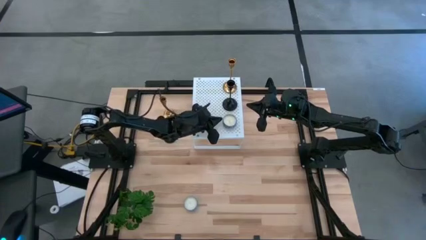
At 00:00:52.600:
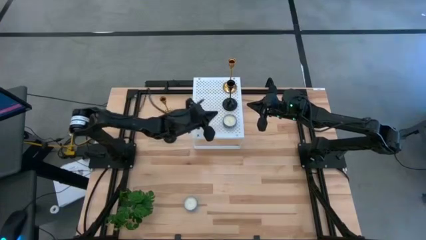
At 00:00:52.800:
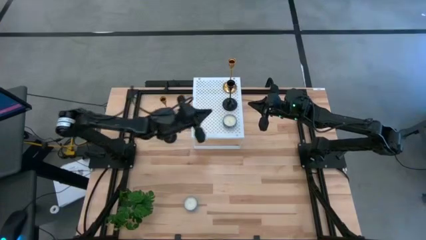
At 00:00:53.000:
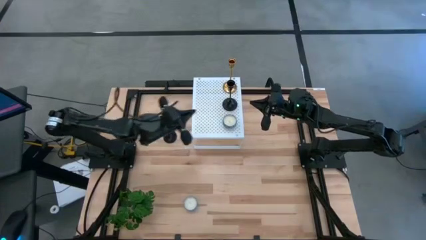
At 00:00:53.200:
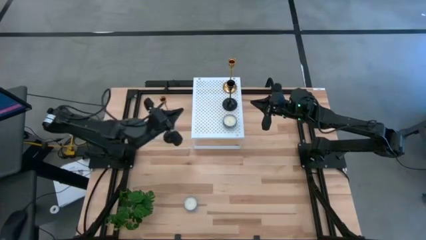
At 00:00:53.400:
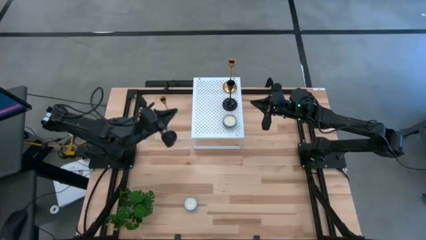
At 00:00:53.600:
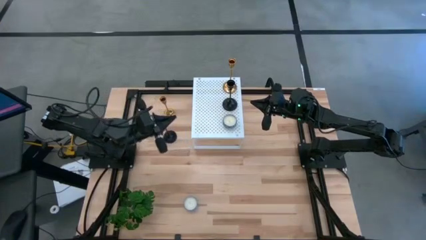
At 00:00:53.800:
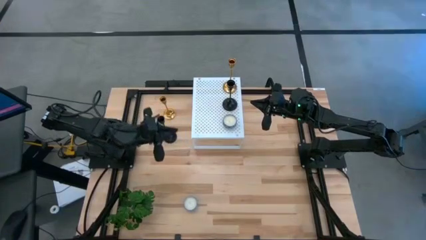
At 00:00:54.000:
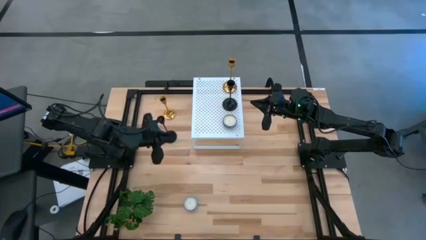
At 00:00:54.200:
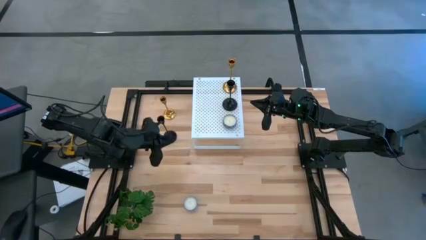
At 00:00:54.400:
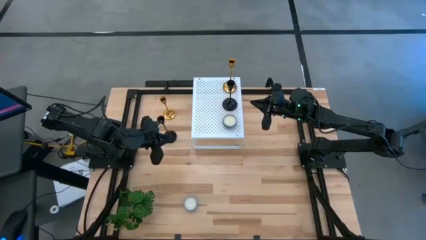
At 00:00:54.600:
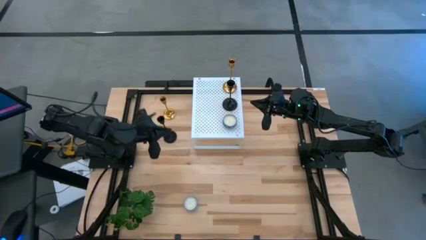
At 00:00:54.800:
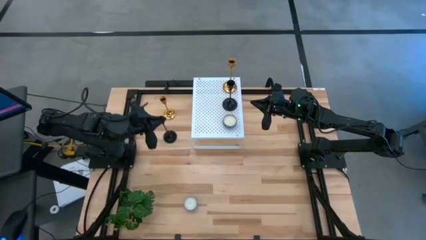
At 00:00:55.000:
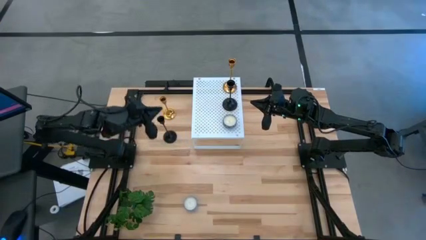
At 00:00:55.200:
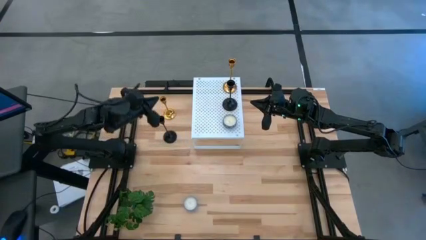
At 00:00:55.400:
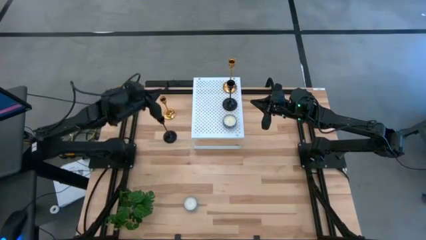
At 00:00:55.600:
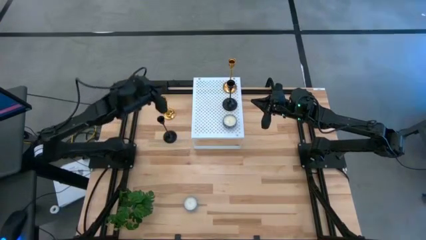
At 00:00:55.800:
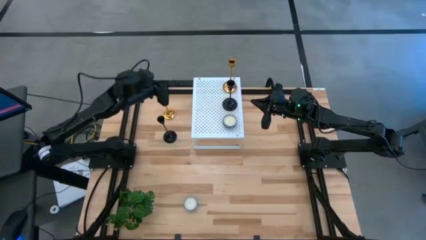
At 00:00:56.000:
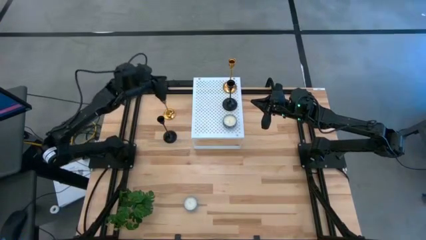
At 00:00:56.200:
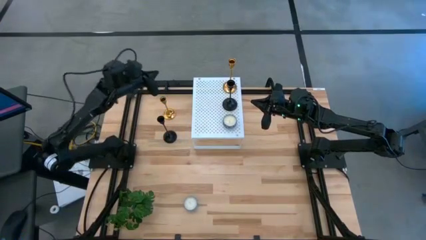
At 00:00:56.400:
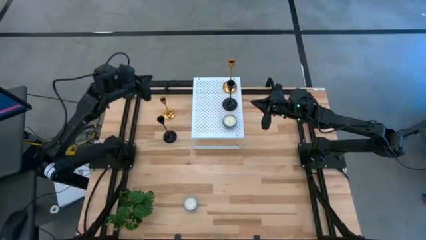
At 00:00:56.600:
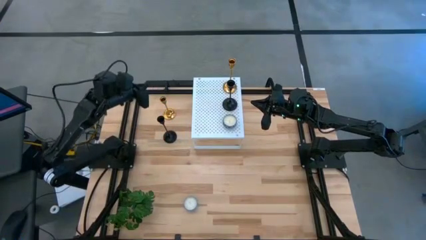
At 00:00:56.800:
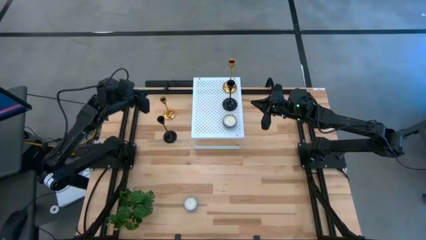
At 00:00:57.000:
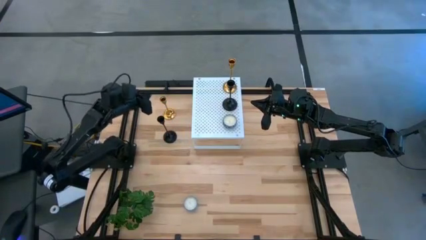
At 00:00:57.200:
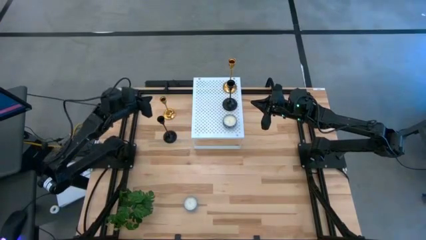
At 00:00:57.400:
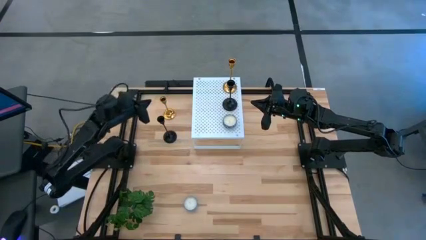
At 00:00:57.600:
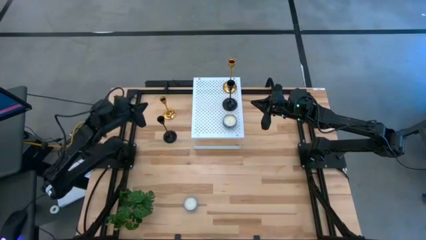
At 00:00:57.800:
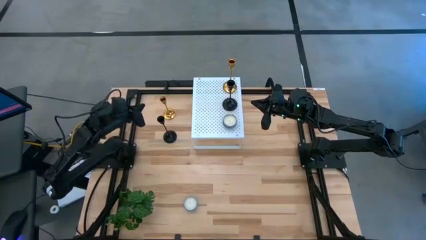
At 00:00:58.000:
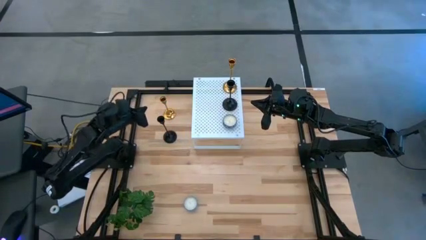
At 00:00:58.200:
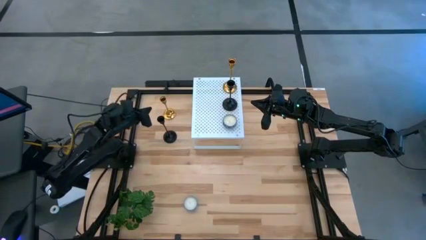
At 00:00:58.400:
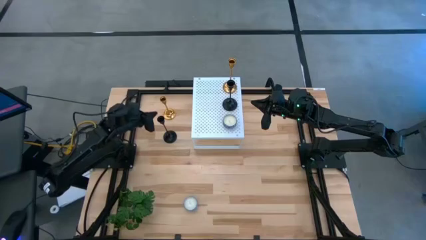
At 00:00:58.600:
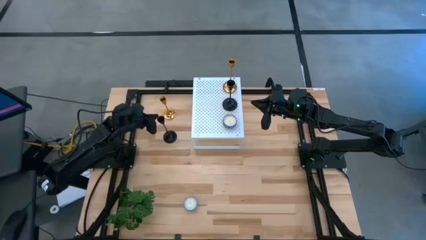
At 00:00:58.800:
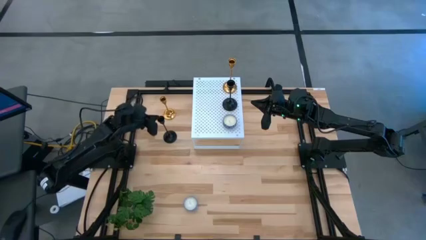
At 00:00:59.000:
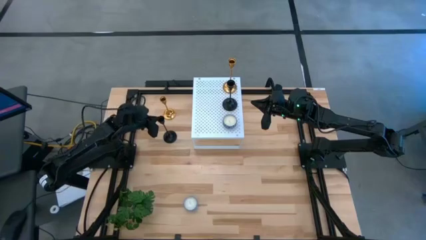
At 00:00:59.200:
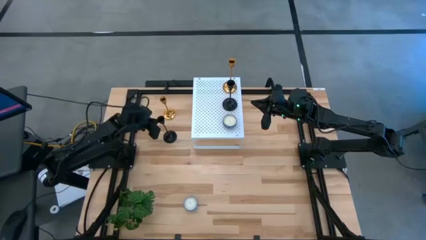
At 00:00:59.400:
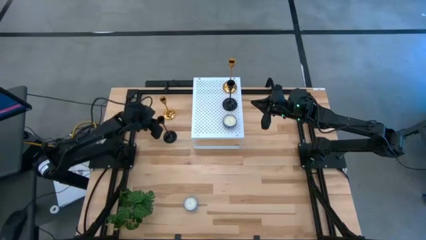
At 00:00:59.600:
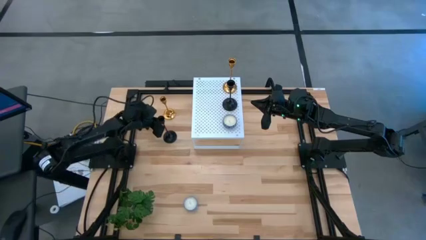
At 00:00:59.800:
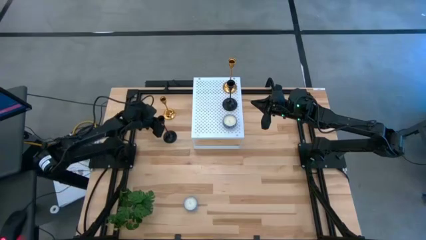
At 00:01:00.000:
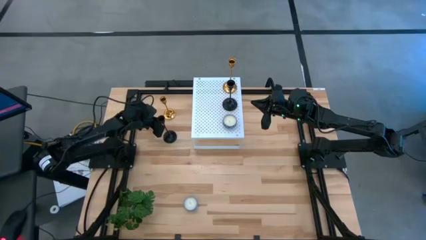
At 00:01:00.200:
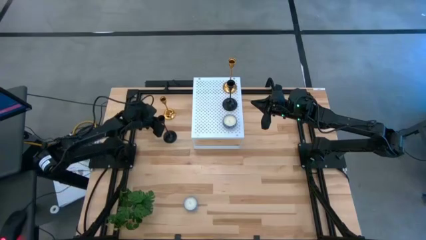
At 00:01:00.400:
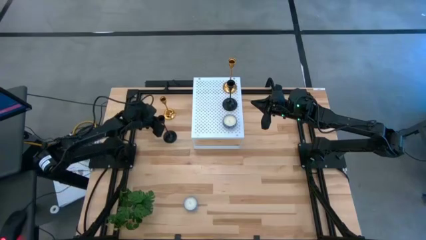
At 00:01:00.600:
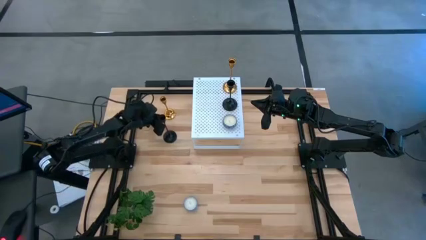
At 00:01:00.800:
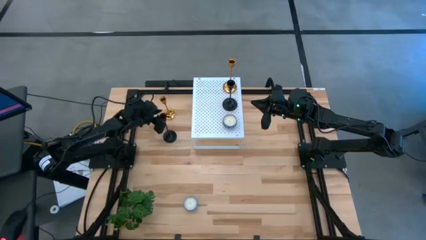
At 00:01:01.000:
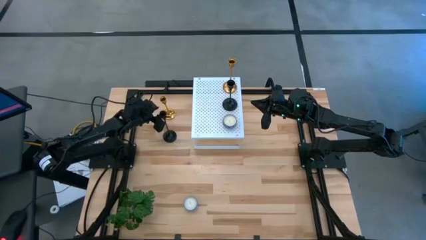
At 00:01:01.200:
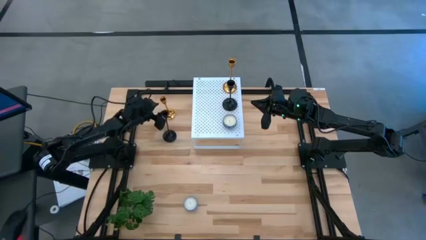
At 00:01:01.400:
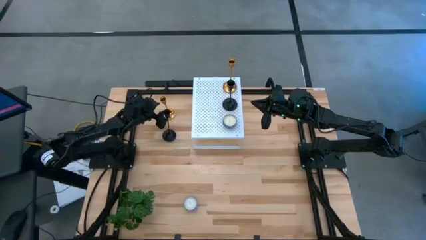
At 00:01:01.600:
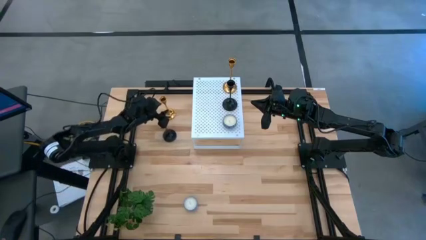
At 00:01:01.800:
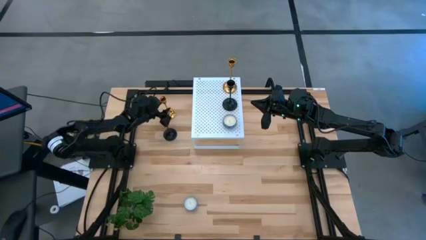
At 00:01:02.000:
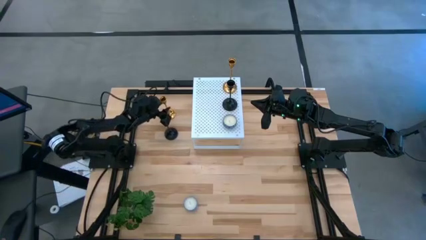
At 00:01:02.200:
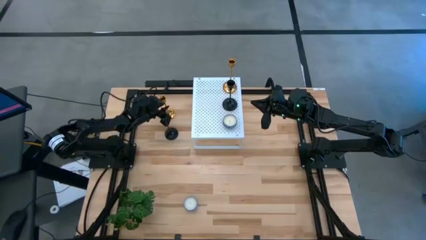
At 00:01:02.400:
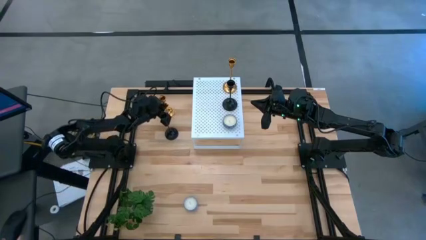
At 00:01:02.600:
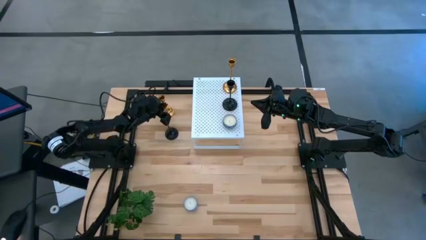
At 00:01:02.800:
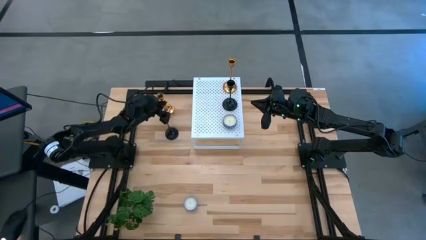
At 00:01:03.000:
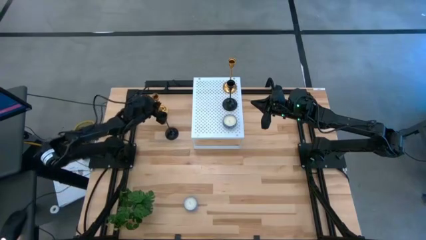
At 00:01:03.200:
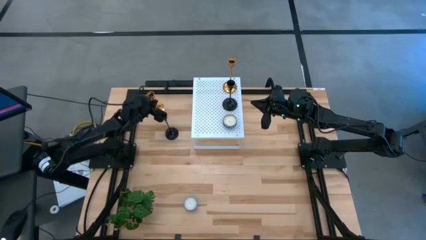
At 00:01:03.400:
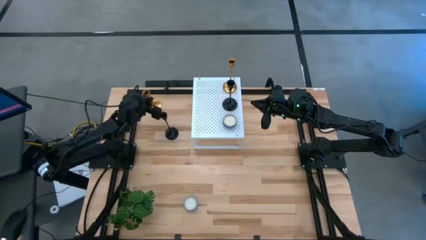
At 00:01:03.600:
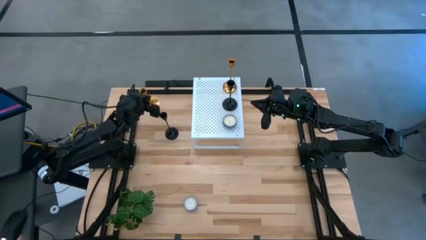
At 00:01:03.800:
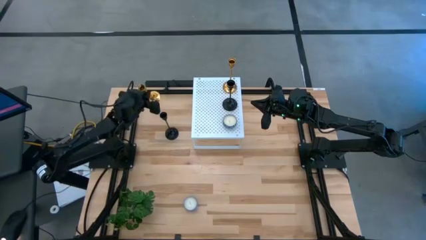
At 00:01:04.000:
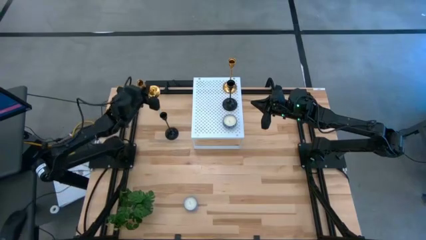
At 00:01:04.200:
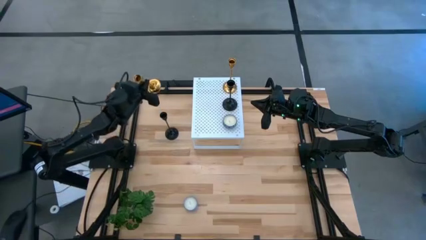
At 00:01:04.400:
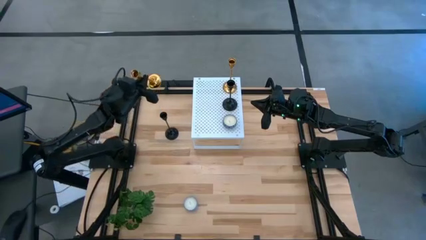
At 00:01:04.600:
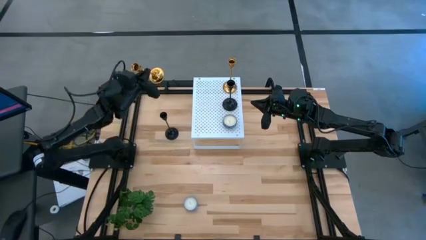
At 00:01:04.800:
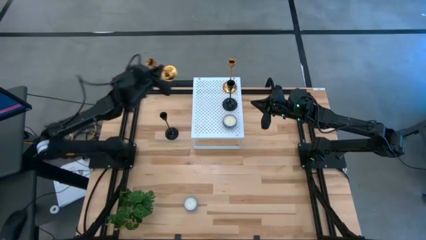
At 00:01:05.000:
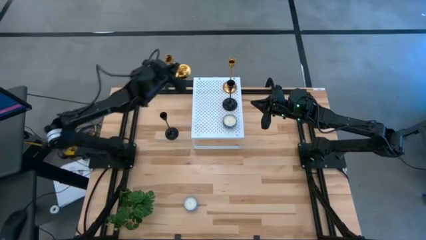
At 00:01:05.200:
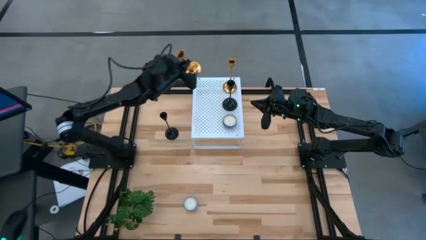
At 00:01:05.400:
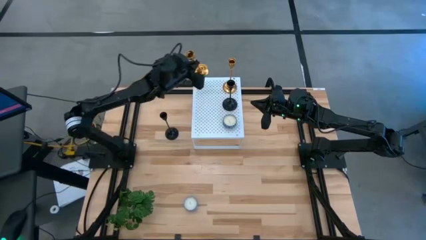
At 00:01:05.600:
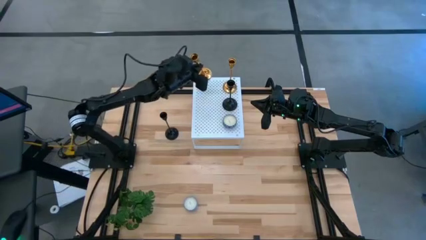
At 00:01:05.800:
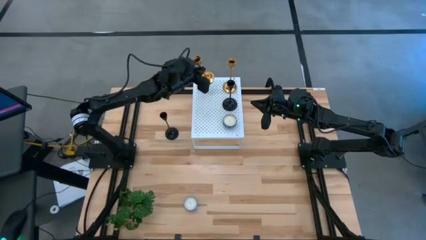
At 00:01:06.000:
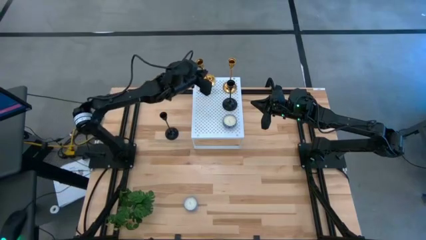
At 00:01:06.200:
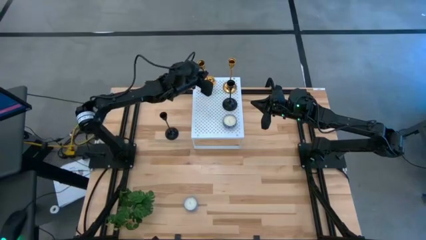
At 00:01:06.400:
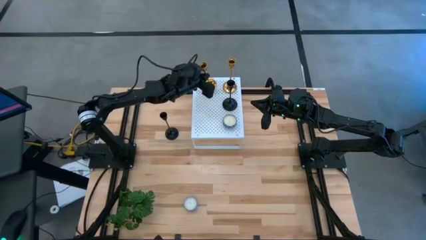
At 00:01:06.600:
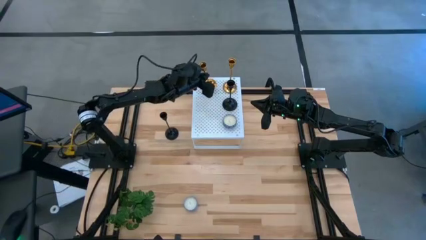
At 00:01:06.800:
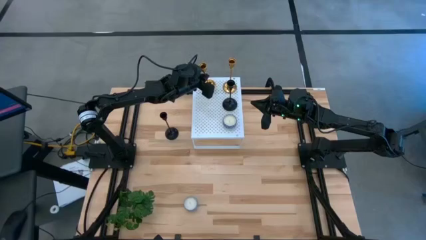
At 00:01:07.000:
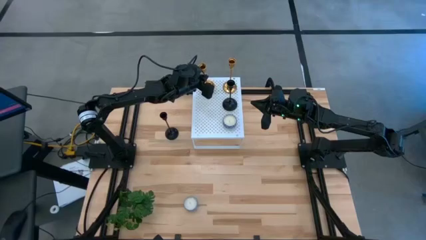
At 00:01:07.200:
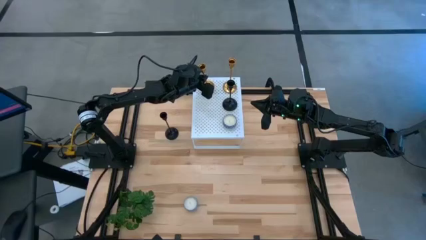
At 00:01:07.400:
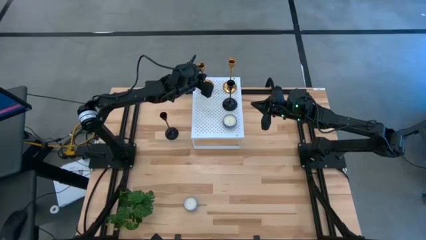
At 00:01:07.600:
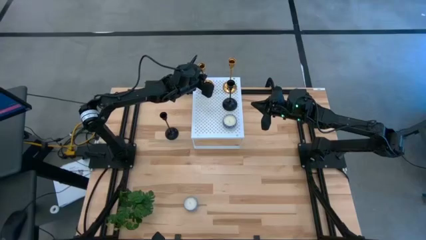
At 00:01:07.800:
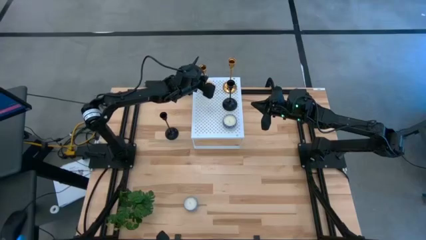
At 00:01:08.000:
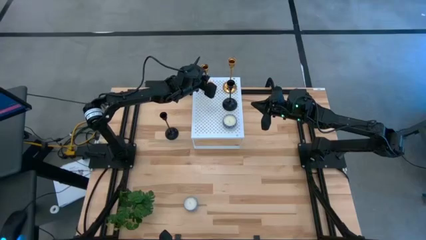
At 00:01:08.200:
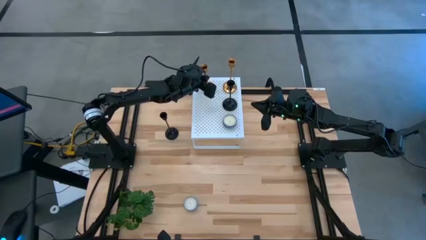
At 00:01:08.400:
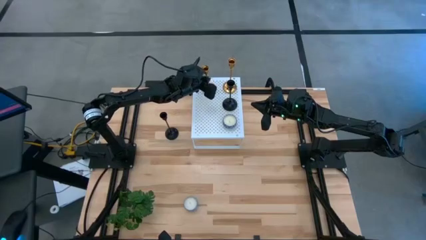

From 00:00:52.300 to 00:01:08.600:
Task: Pick & Place candle stick holders
Put the small golden candle holder on the shelf aligned with the large golden candle holder
